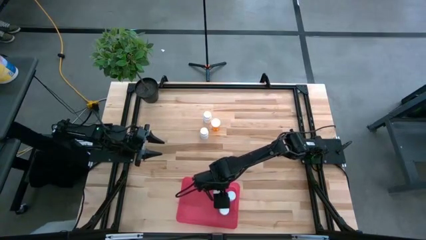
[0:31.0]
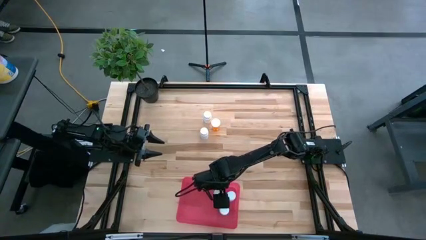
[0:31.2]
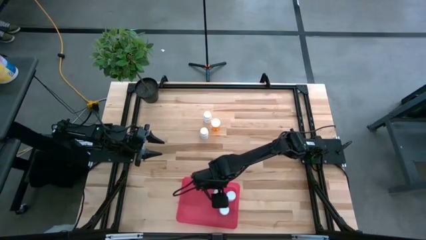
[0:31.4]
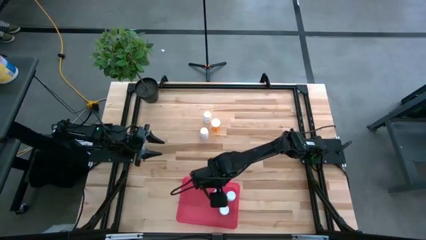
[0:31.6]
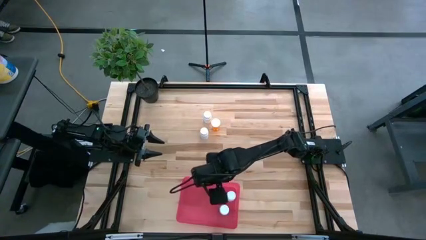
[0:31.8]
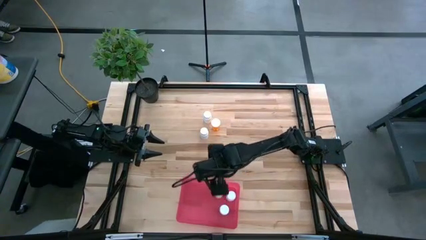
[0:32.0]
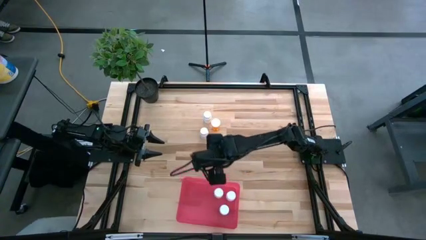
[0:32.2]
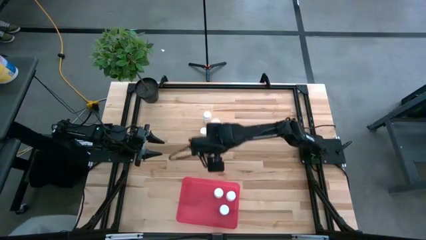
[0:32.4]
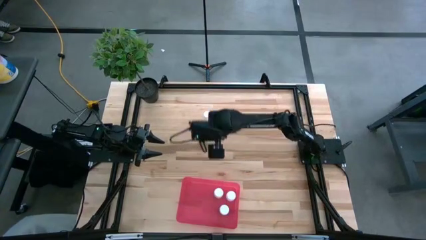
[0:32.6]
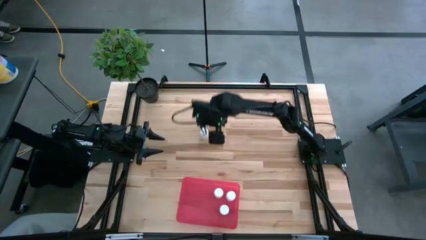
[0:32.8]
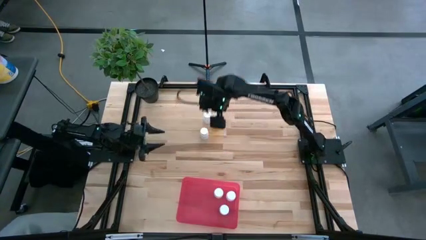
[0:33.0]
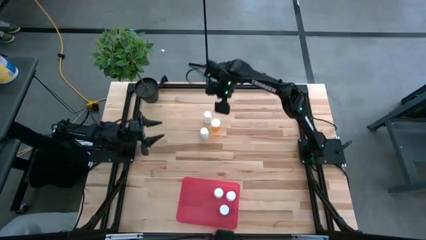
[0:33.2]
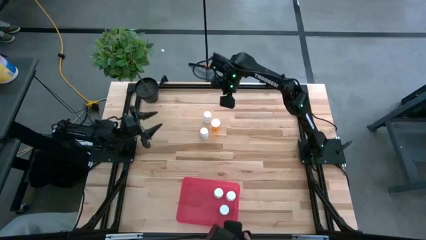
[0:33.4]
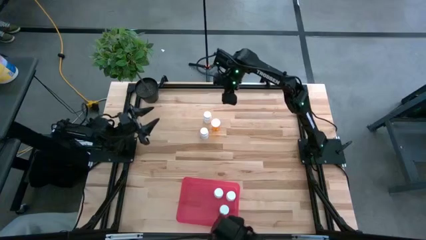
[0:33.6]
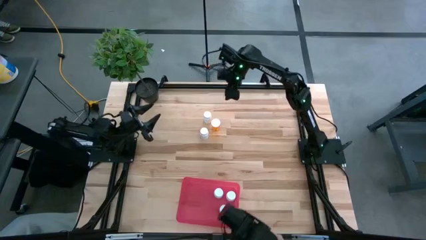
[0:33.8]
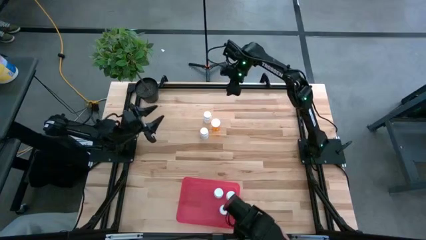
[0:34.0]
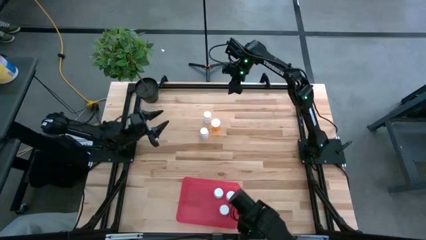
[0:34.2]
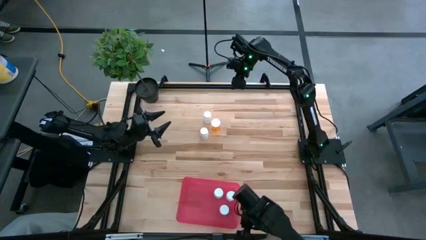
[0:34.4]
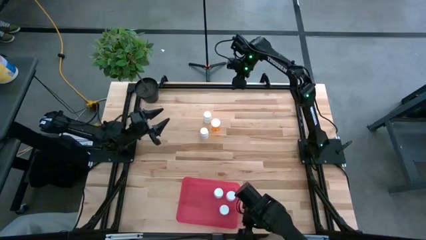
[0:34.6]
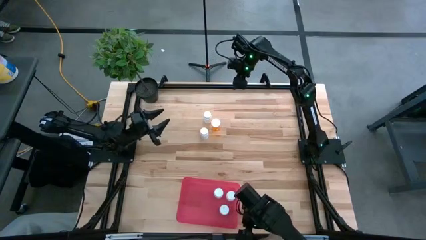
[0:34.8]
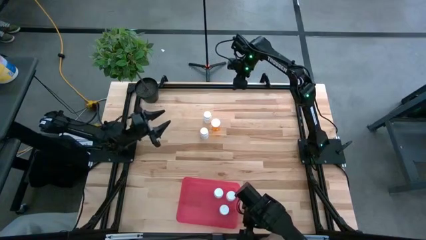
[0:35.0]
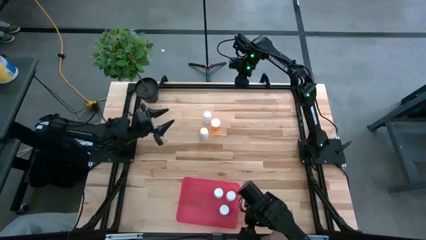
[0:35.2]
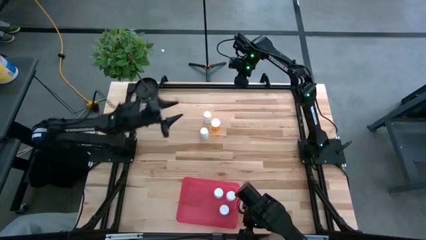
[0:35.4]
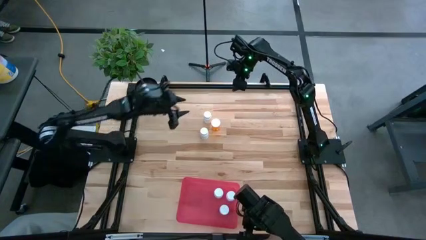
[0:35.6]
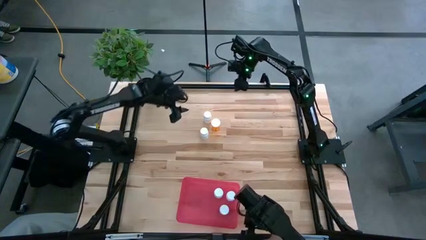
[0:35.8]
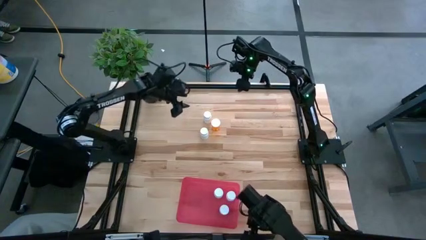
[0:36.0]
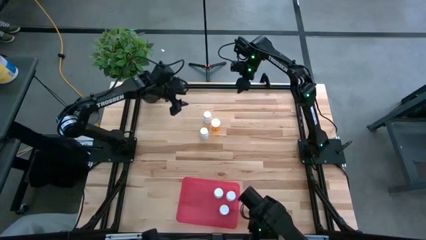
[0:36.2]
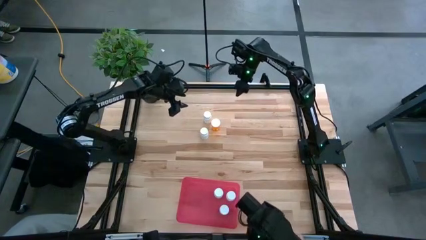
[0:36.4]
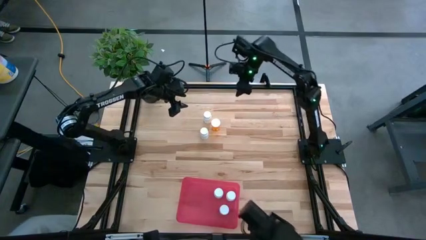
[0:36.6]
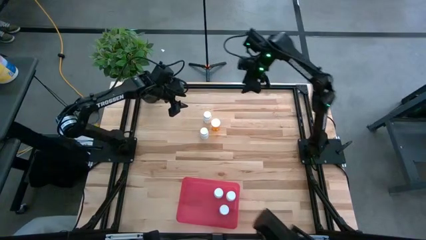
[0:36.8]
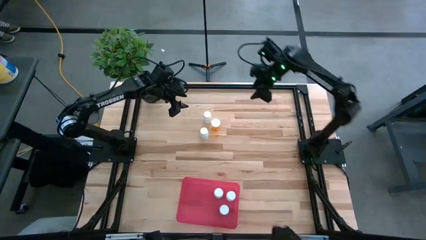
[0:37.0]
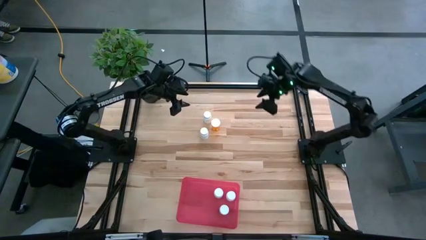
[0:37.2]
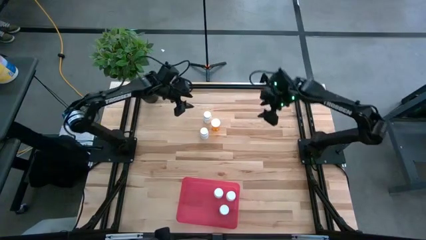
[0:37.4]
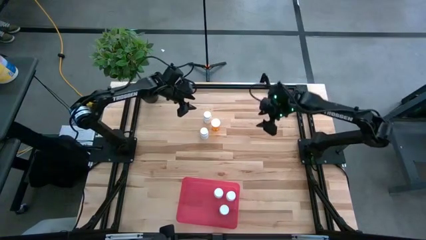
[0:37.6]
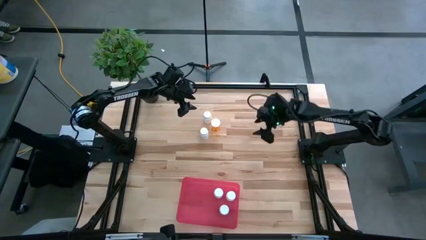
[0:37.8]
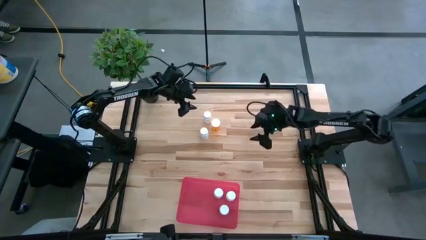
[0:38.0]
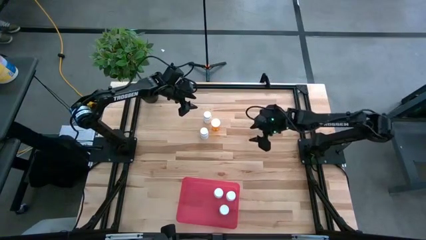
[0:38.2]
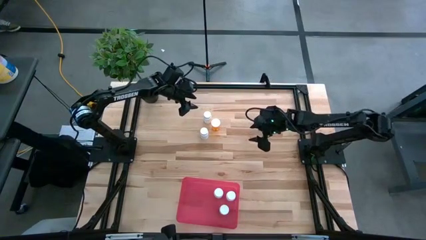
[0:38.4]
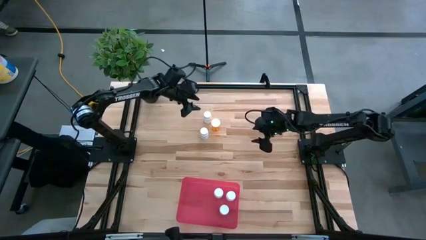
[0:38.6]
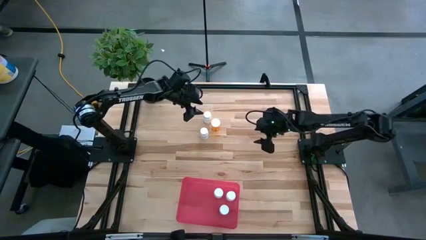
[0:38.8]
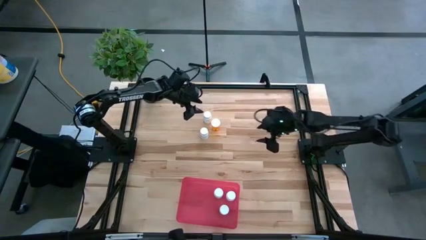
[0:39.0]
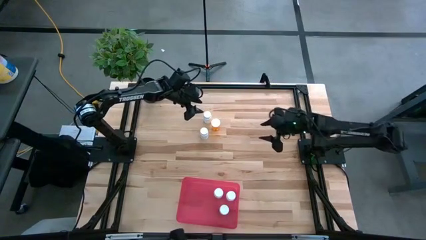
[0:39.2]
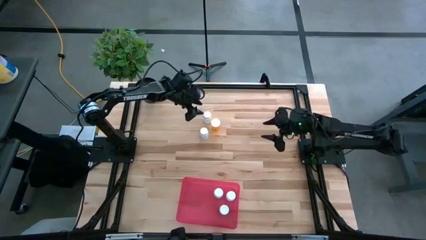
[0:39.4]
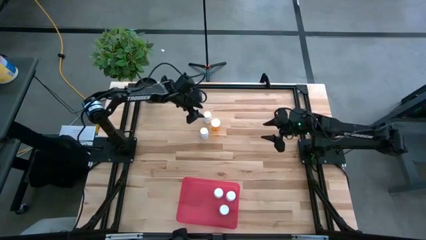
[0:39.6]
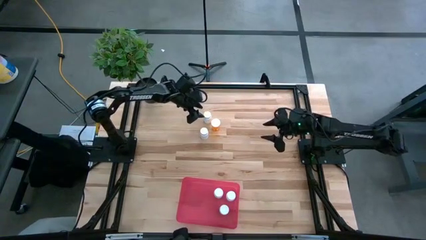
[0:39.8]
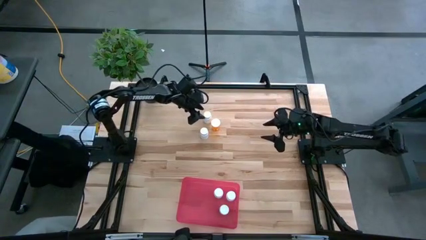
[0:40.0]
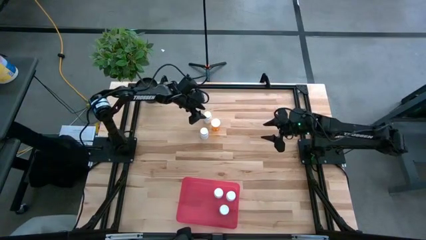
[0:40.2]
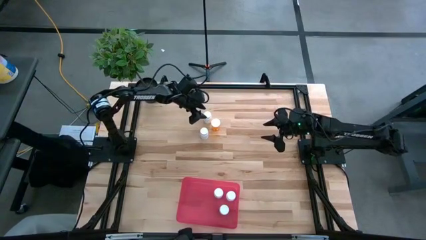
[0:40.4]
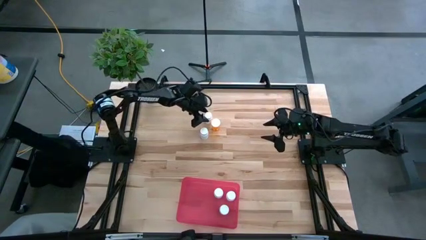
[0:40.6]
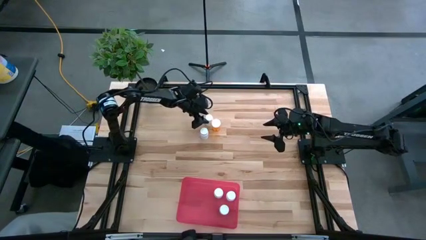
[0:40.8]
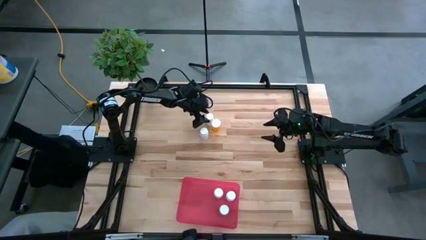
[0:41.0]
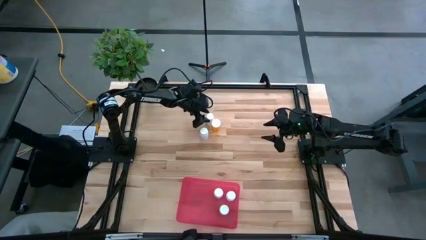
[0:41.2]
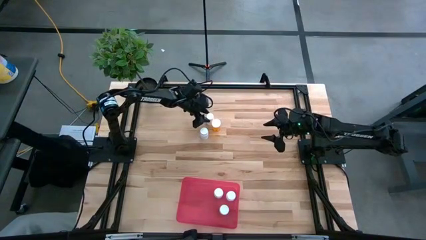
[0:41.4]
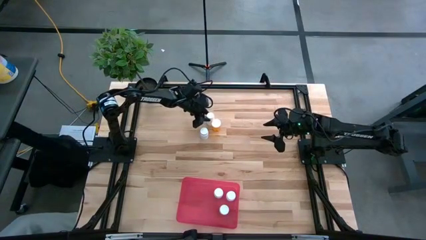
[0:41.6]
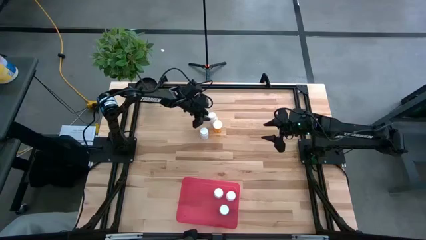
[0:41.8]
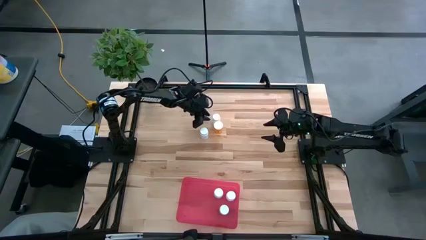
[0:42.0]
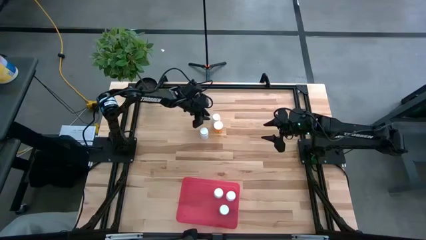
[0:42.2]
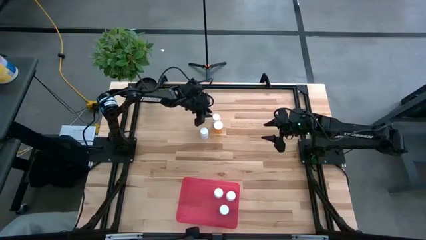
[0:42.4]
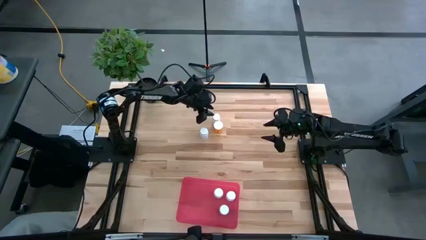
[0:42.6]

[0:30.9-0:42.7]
Task: Pick and place pill bottles into a basket
Put the white pill bottle into the red bin

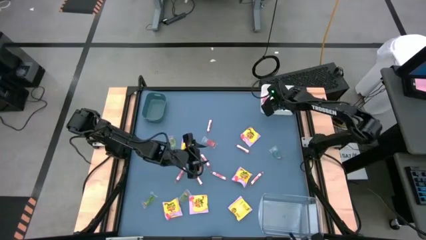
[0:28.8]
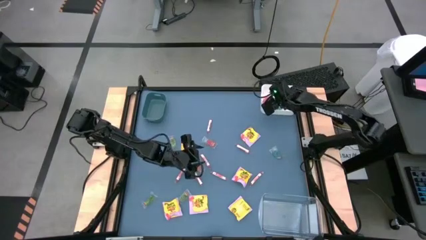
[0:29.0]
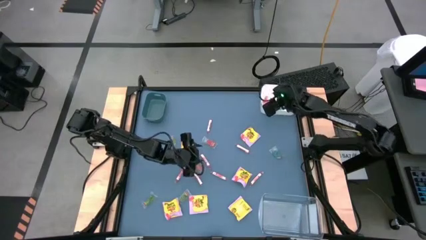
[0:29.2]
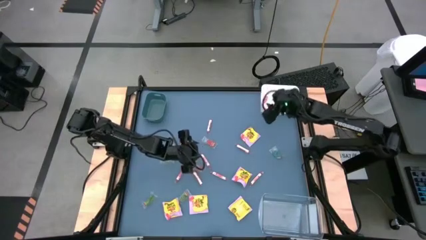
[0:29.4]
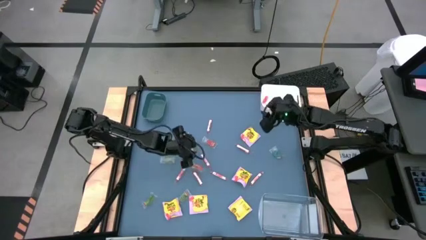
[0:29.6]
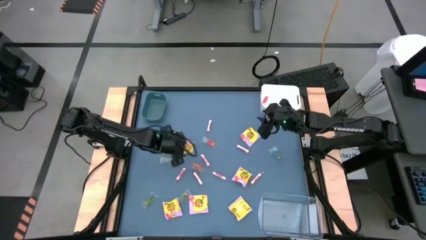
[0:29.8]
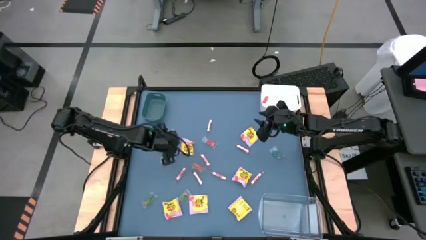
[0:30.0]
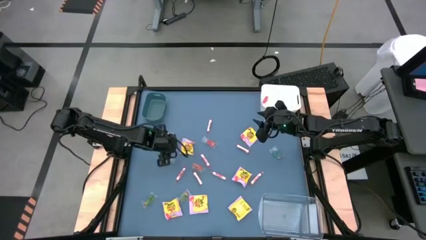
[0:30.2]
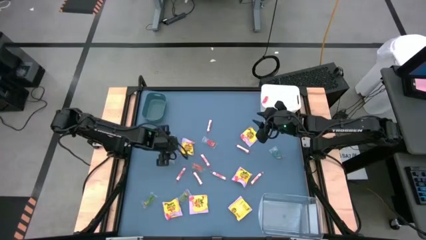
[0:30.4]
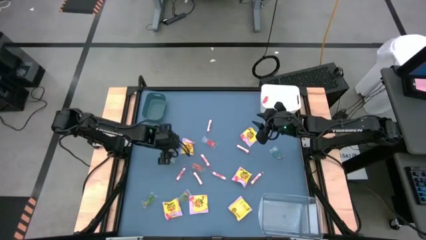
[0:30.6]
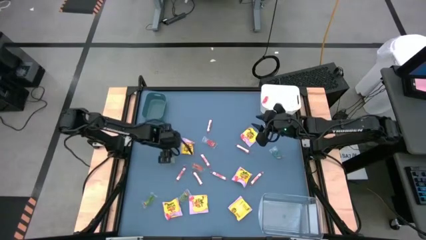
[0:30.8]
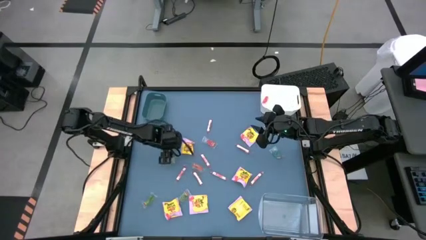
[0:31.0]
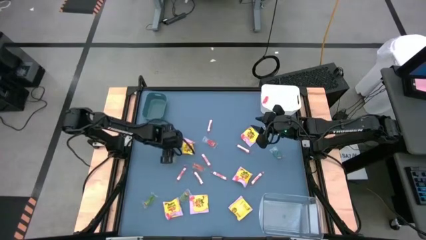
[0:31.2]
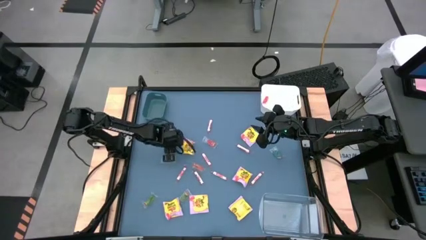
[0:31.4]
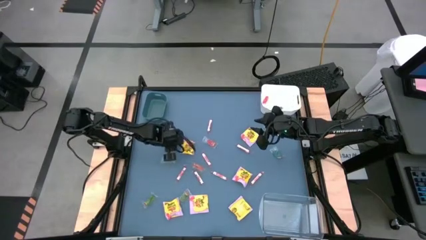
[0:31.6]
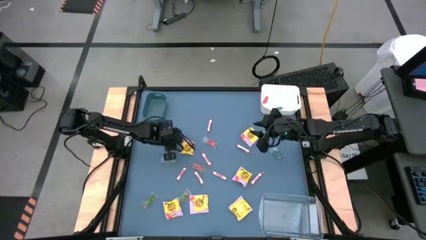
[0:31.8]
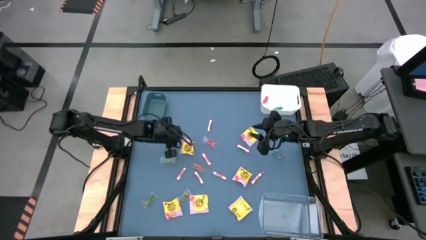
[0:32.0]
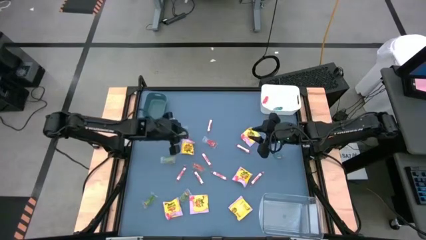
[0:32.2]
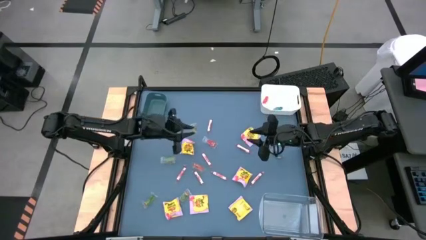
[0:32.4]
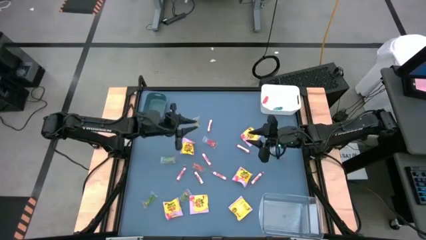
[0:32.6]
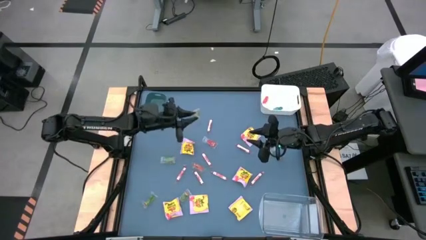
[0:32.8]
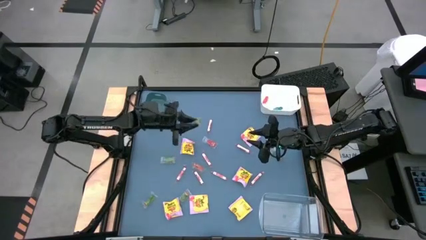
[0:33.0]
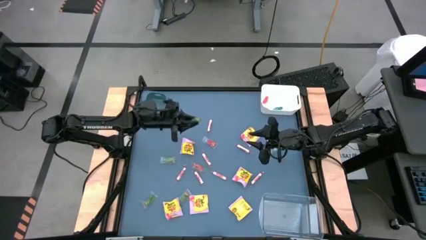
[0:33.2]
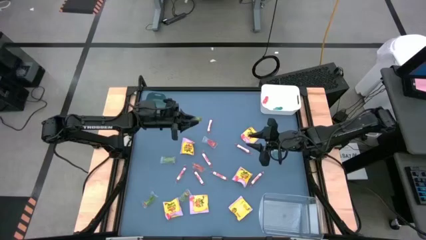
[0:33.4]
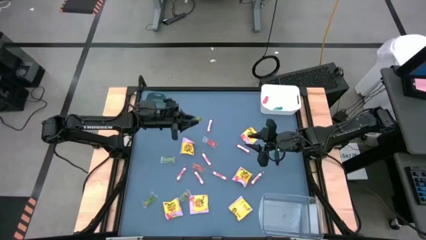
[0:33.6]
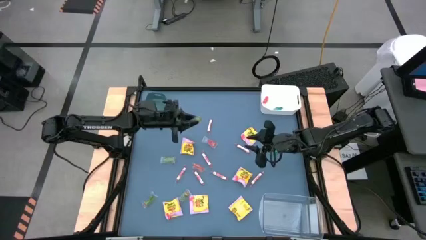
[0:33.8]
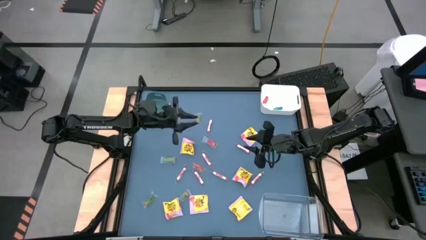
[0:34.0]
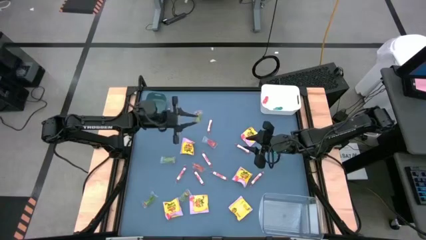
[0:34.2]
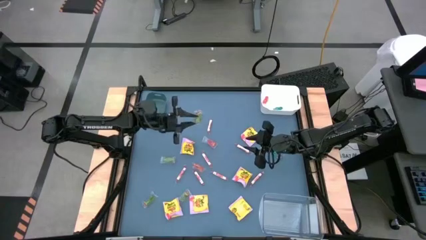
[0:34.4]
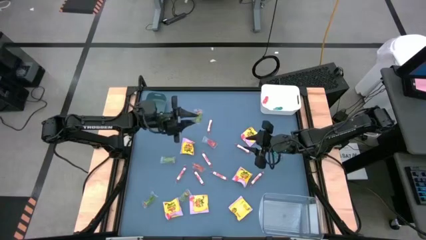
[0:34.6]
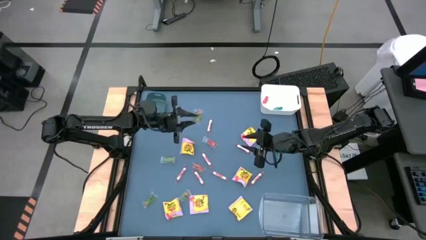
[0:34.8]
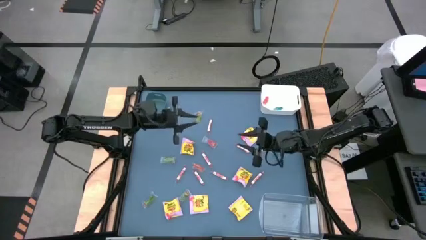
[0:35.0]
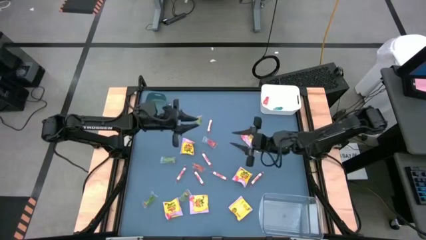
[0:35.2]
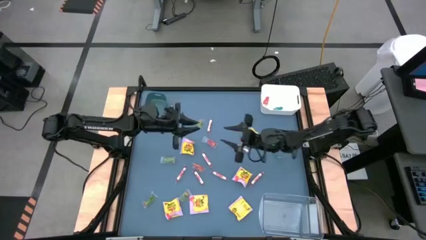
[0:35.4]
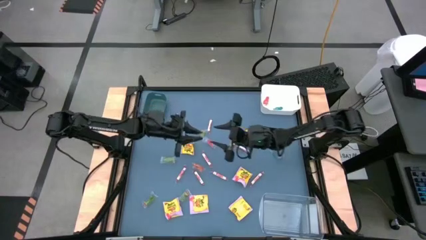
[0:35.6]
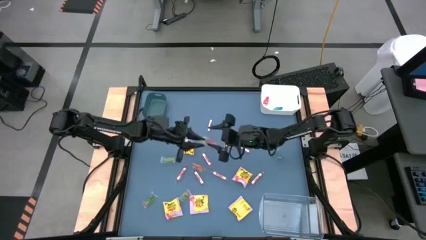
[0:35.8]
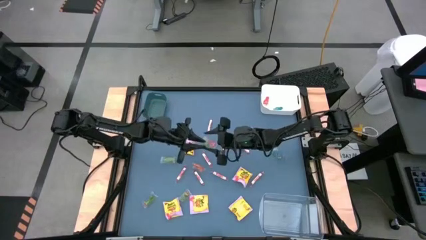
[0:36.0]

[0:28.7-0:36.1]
Task: Sort candy
Put the green gummy into the white bin
